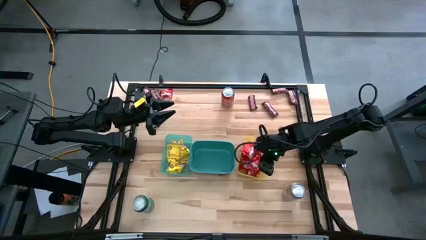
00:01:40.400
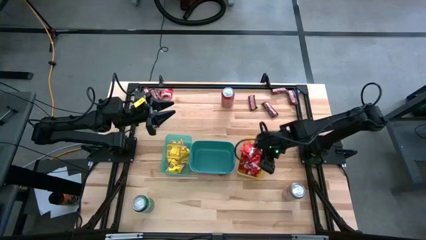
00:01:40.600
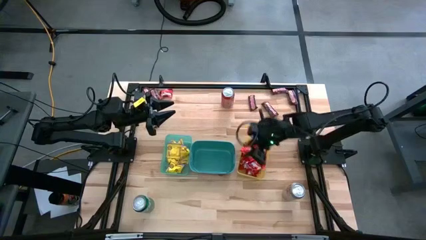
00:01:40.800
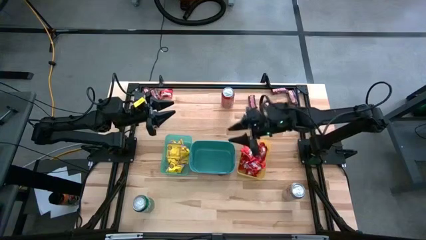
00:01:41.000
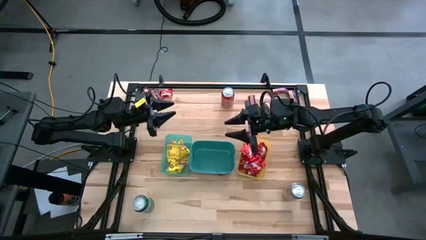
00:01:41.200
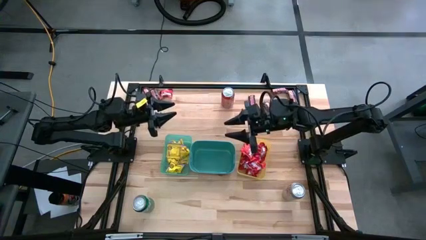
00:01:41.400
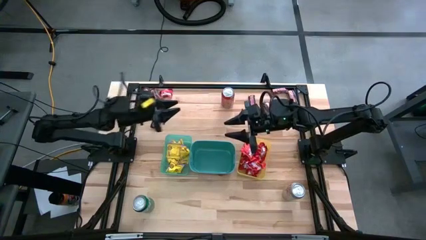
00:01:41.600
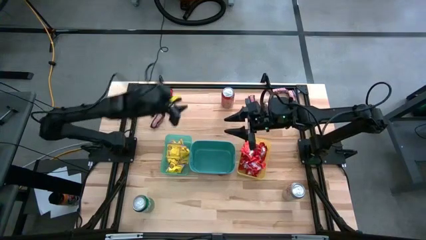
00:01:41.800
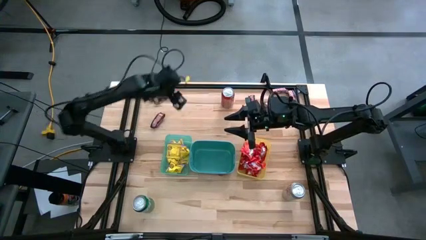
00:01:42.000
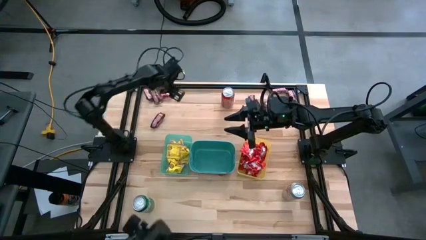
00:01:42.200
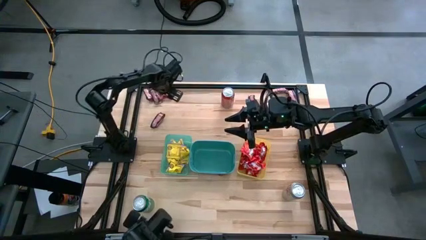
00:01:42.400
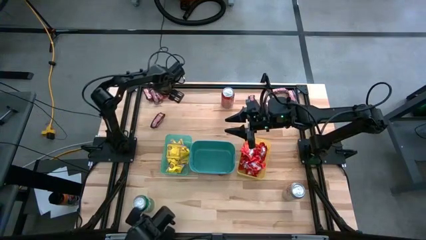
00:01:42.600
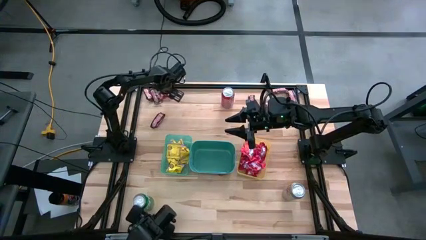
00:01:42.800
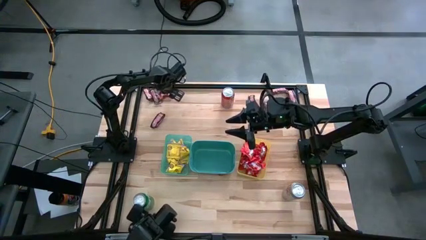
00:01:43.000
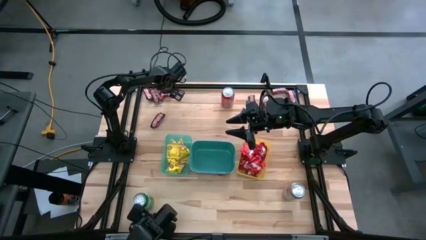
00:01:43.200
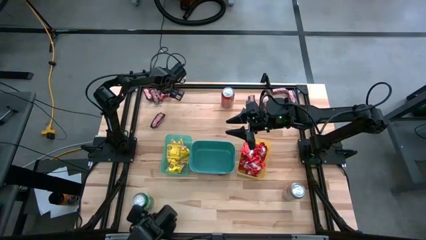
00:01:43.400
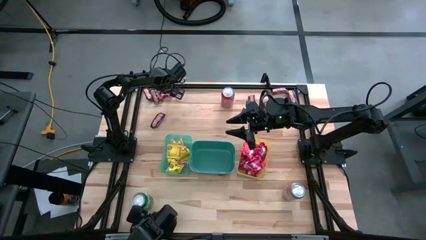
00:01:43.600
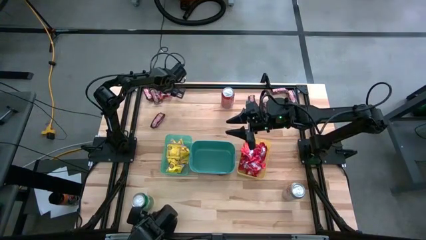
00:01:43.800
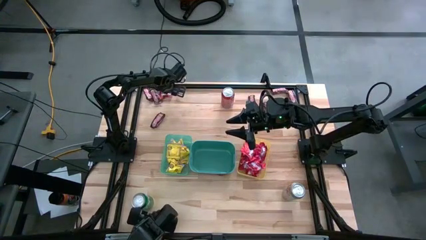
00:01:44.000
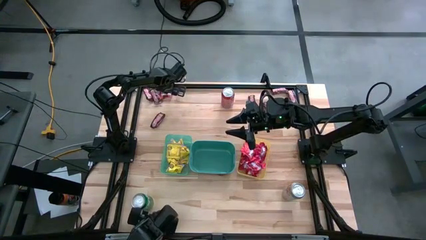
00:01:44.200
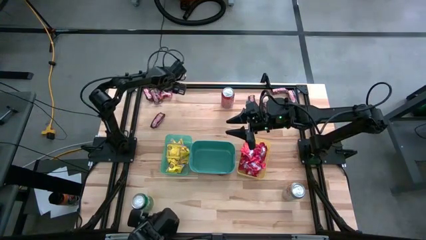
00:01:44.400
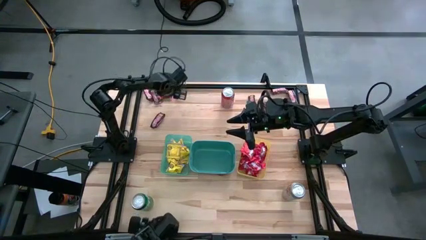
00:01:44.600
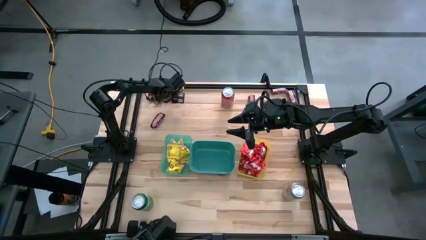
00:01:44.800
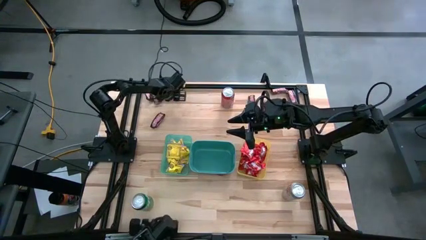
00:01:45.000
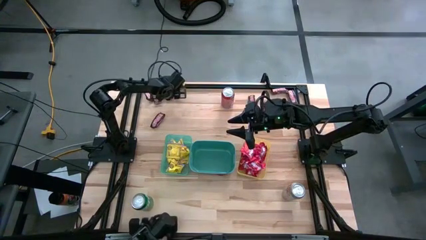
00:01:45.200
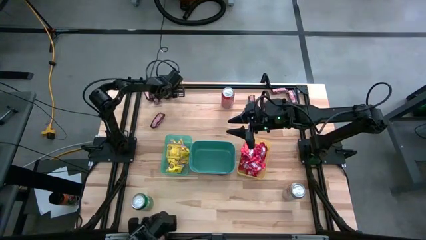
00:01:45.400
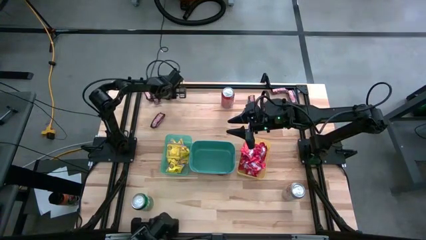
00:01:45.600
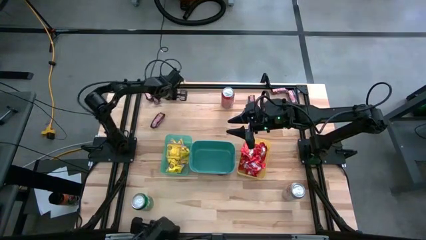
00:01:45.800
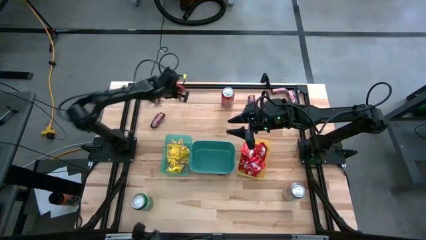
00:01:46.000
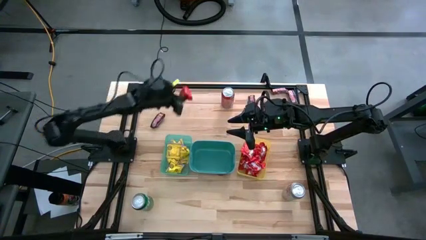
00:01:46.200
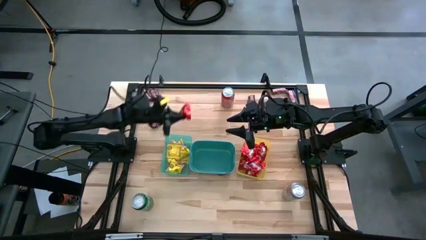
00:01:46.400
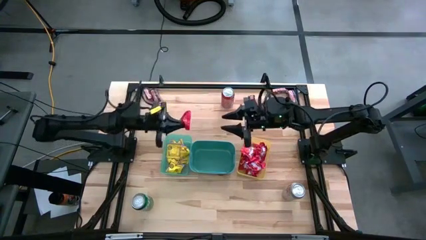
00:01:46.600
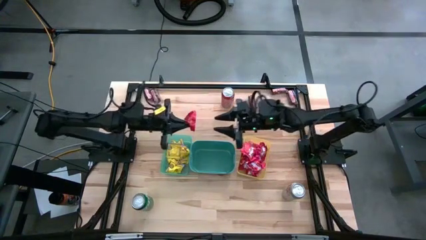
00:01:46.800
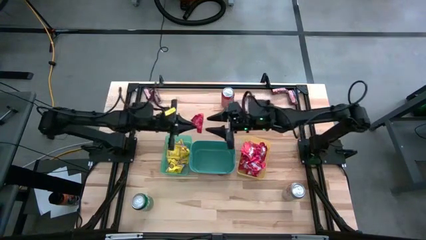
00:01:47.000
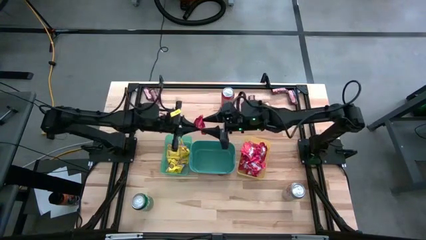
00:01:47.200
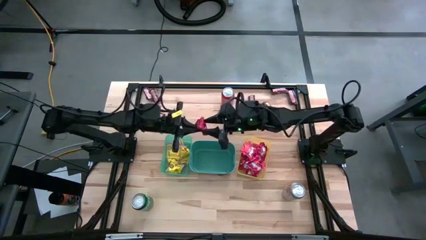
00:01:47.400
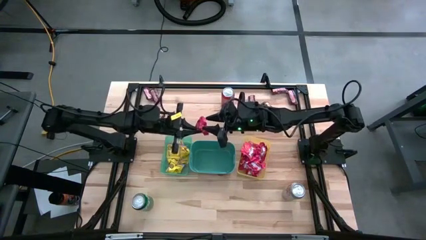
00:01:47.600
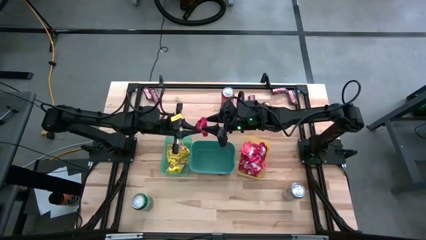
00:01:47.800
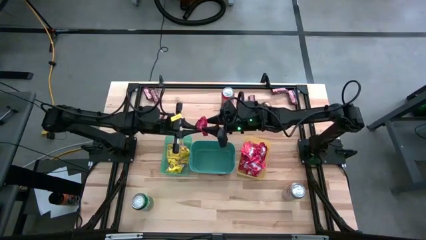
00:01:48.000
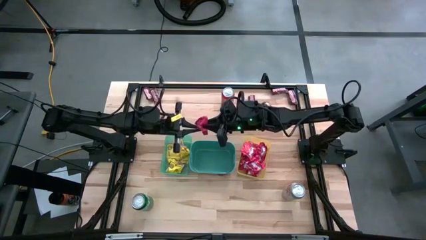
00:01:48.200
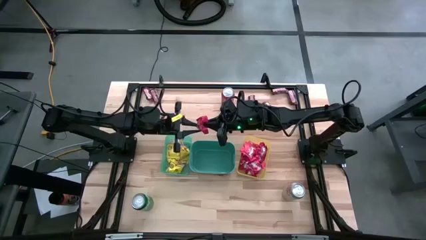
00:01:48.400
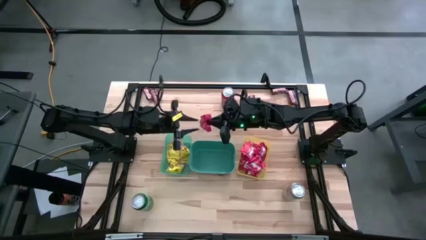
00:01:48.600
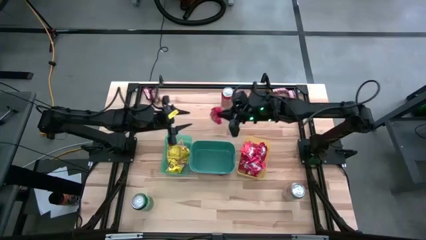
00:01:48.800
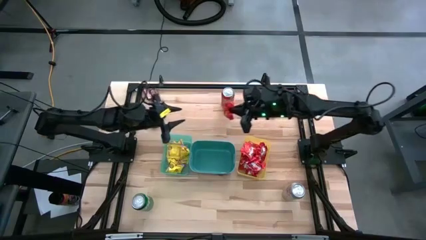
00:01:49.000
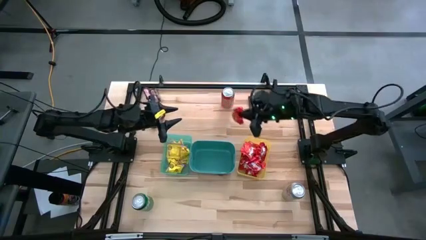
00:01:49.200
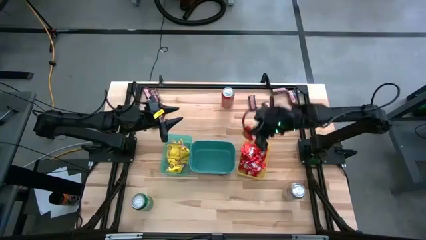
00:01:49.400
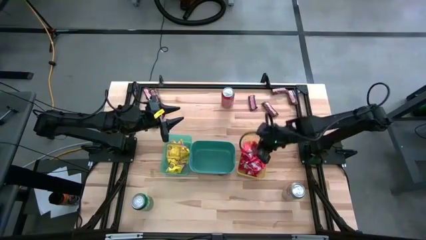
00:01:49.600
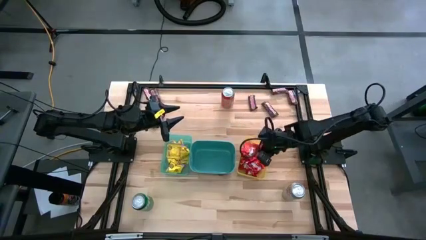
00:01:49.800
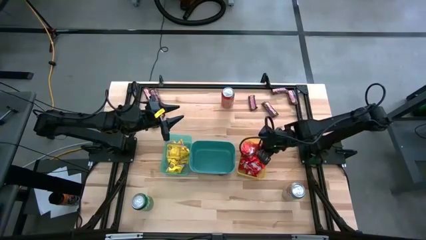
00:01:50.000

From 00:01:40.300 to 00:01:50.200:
Task: Sort candy
Put the red candy into the yellow bin

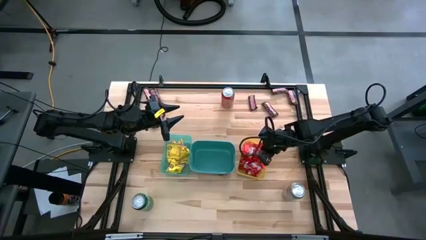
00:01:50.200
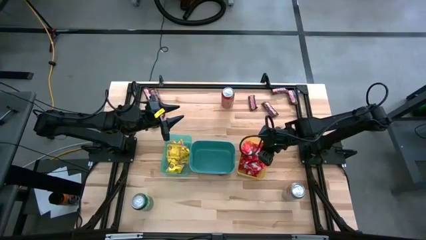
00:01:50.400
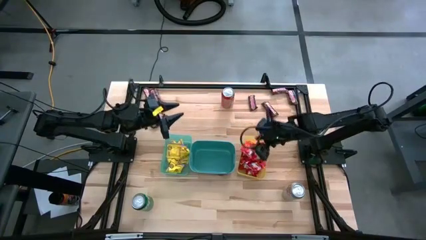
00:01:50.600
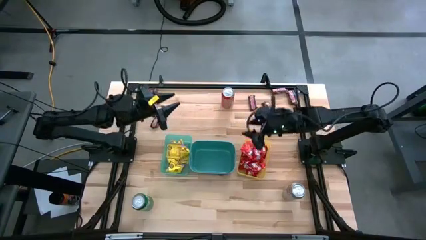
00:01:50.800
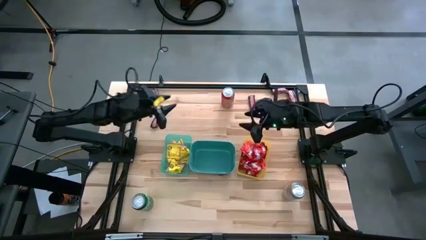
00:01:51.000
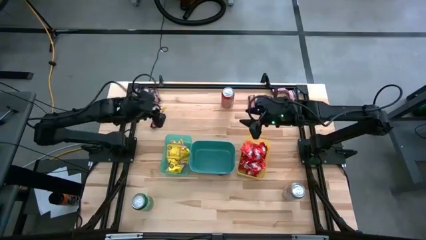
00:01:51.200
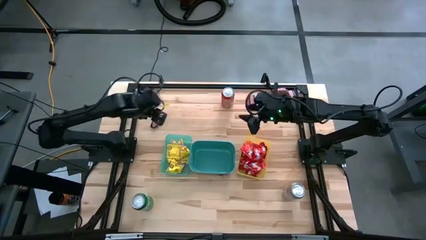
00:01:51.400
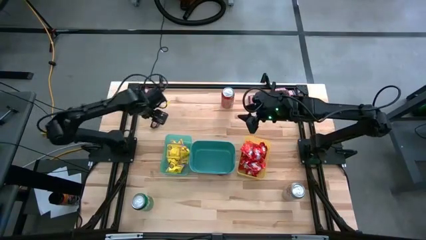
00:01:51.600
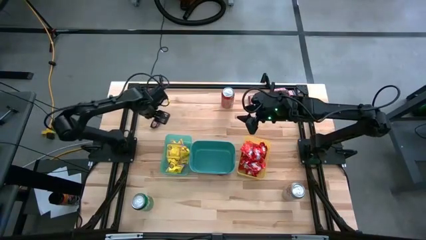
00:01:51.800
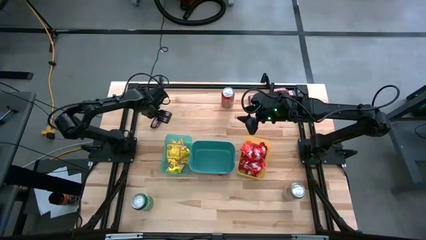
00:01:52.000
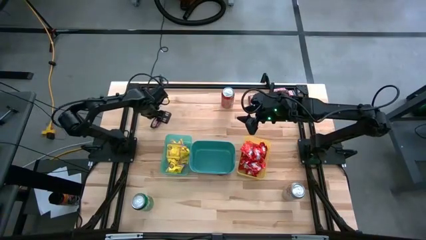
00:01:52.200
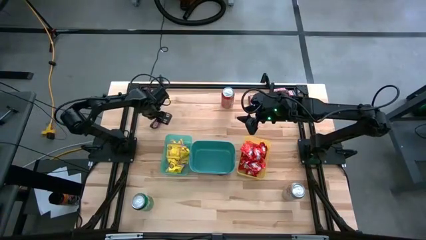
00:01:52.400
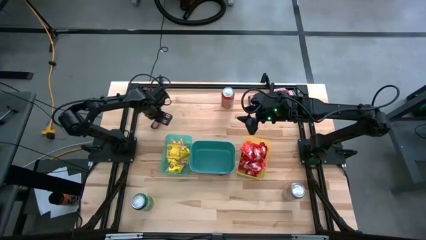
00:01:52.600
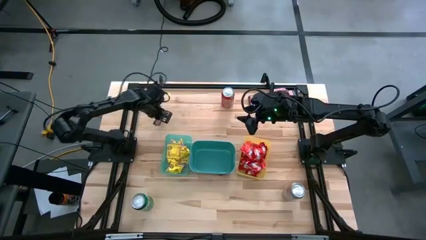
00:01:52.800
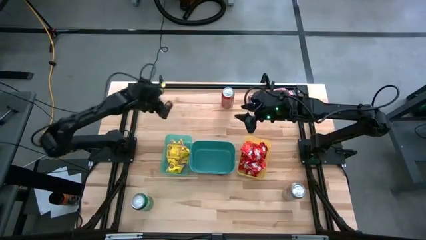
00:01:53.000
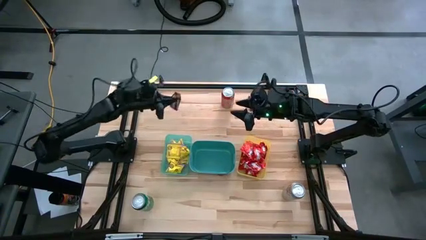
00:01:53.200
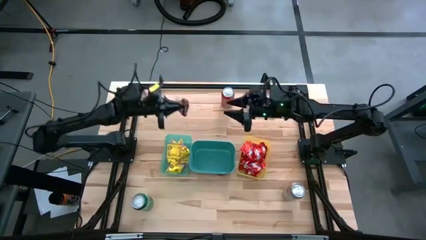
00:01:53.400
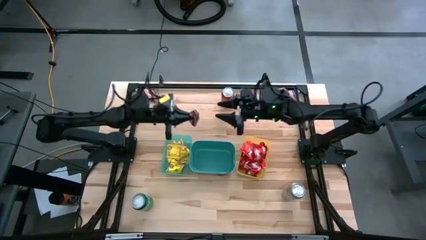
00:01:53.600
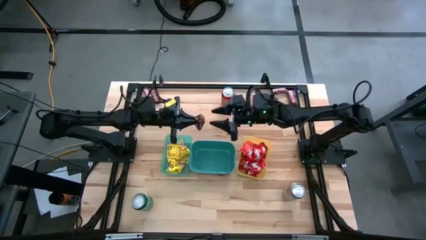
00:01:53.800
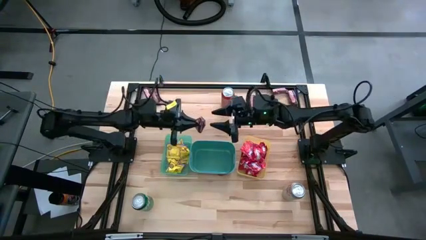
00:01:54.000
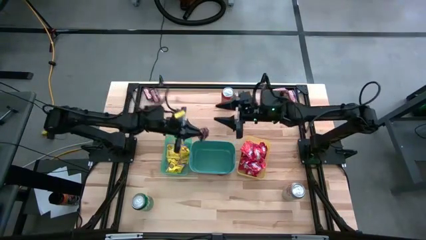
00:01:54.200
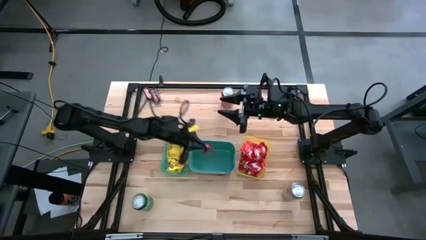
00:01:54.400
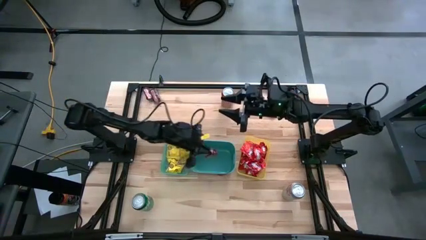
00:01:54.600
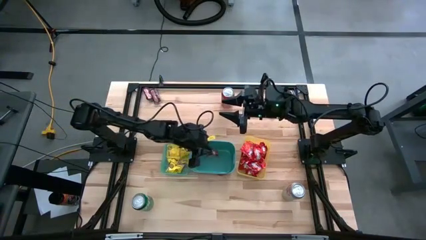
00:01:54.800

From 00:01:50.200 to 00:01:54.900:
Put the brown chocolate into the green bin

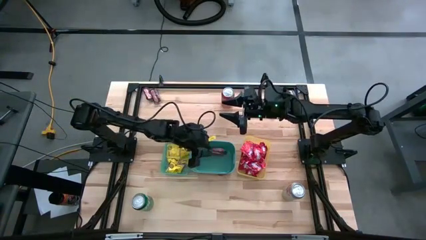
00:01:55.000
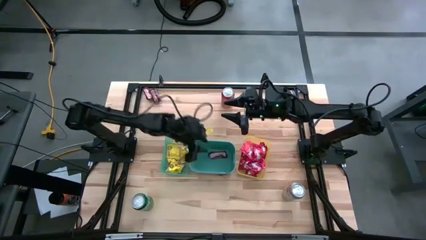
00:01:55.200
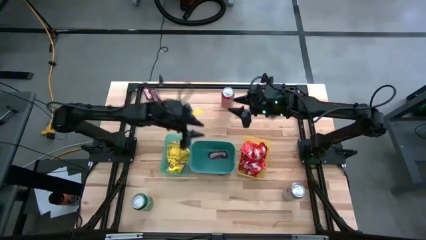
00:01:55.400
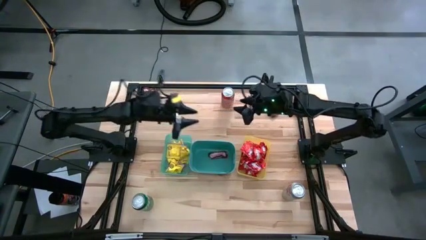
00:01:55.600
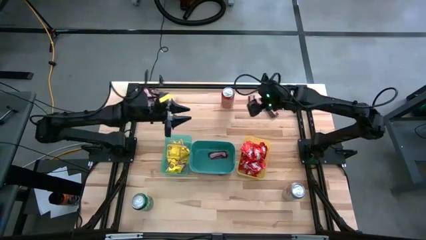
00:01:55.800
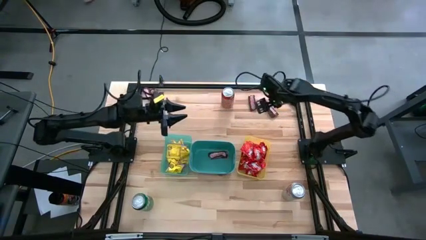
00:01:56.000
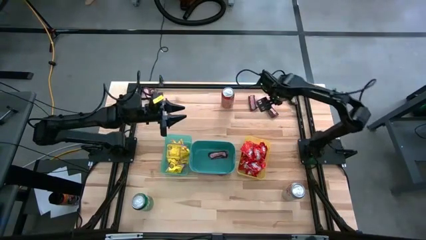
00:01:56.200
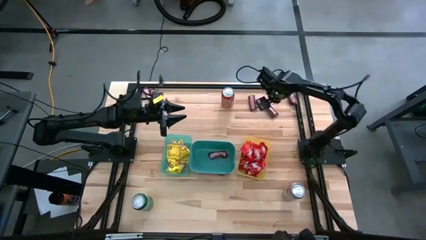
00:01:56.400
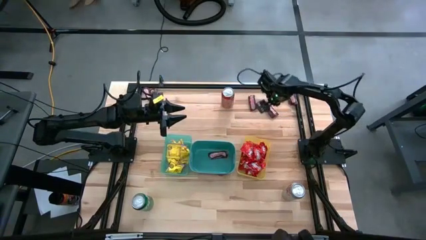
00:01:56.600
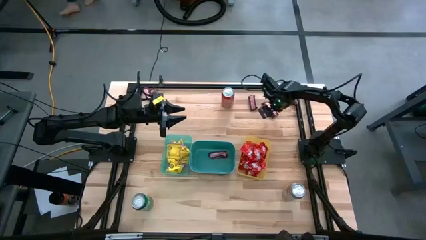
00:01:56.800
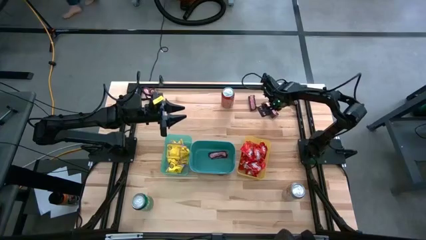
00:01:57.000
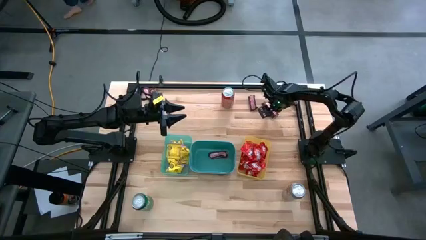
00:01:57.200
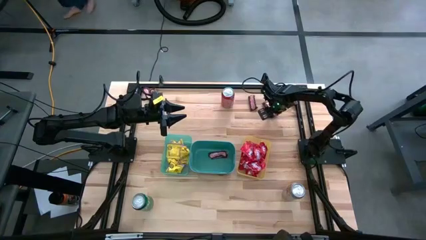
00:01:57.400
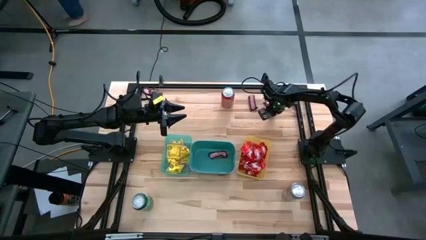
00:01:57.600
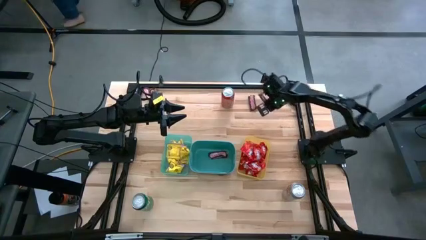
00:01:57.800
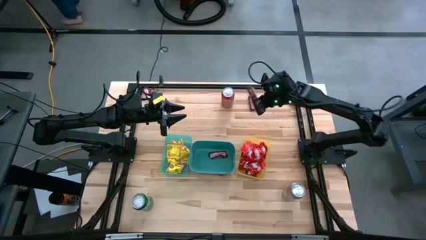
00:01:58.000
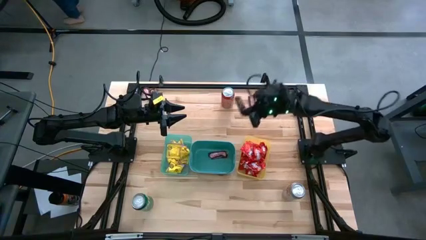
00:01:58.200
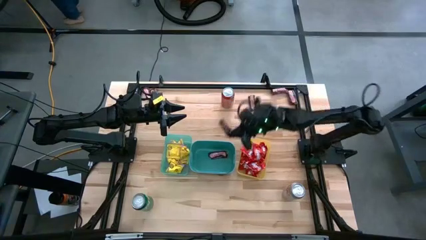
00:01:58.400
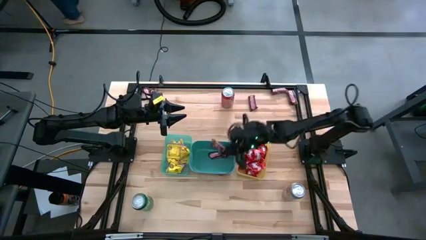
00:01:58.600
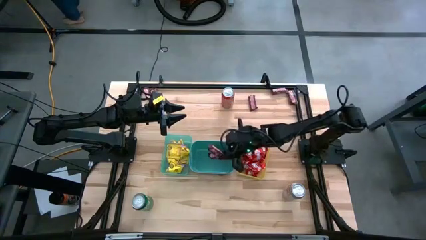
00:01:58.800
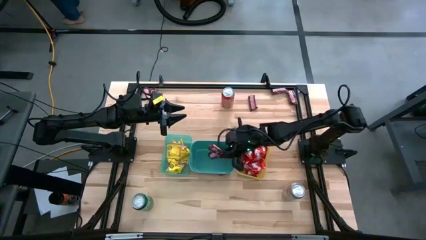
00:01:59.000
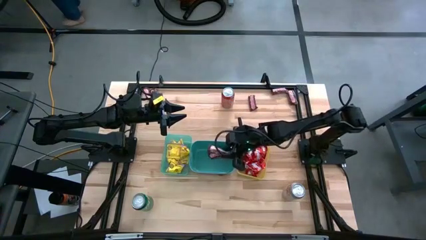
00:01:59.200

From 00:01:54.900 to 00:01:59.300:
Put the brown chocolate into the green bin
